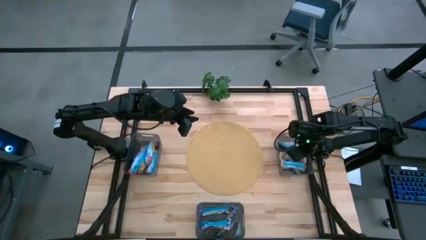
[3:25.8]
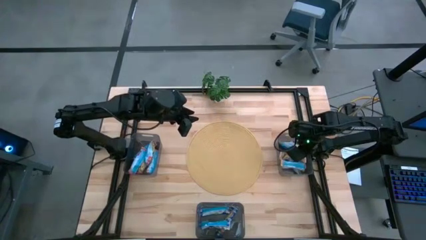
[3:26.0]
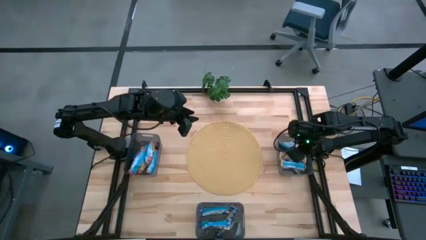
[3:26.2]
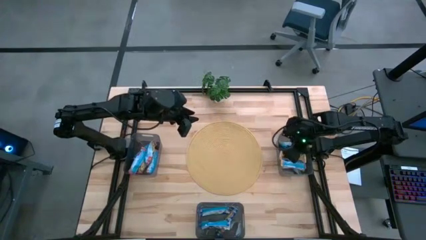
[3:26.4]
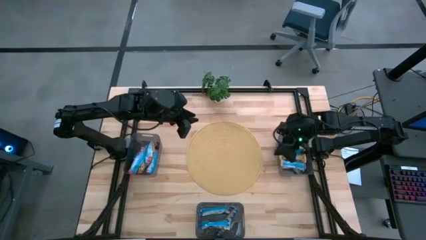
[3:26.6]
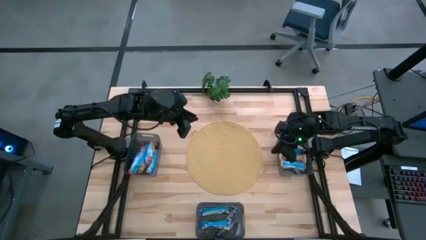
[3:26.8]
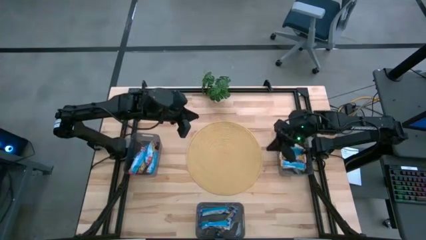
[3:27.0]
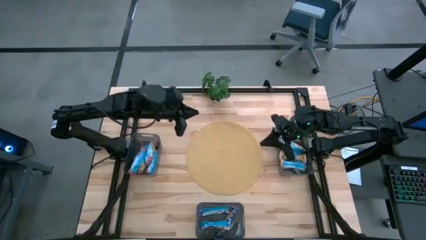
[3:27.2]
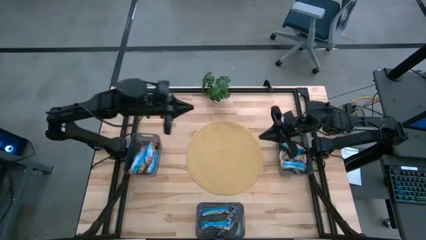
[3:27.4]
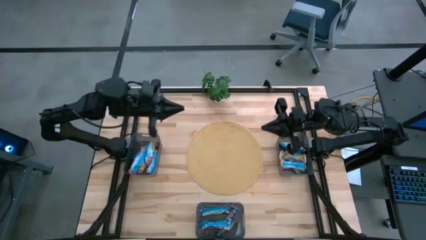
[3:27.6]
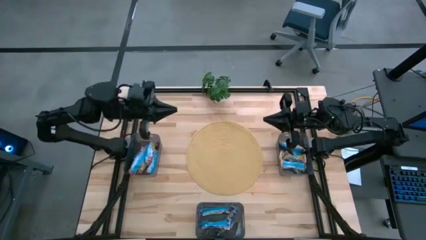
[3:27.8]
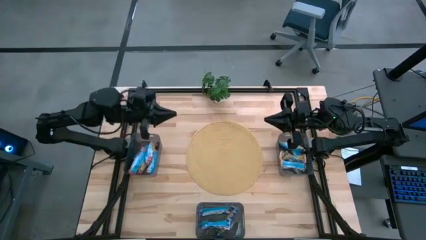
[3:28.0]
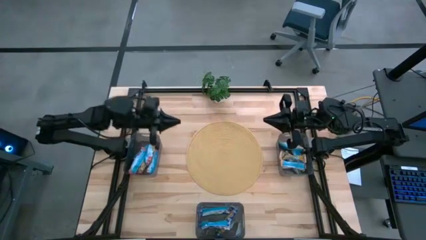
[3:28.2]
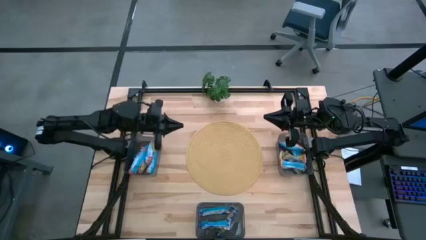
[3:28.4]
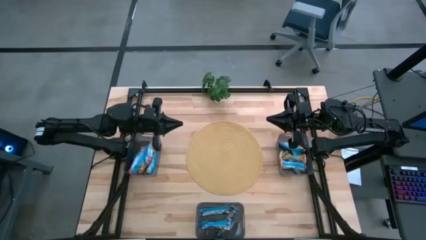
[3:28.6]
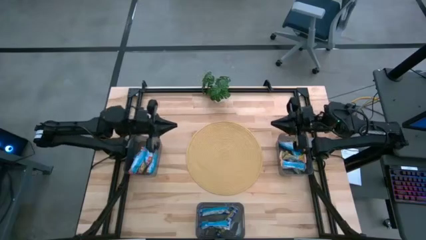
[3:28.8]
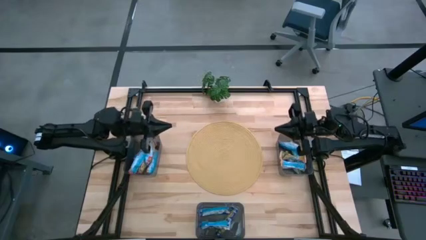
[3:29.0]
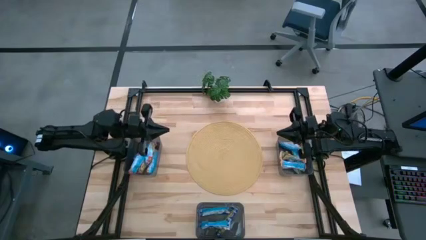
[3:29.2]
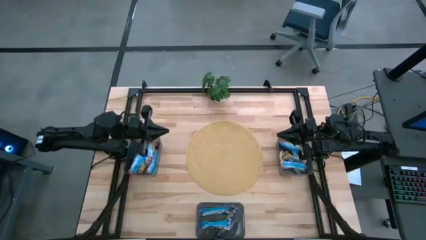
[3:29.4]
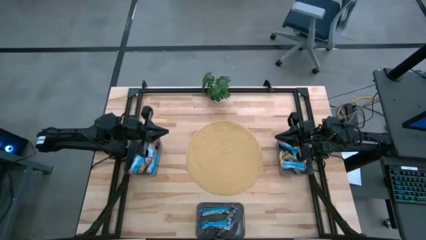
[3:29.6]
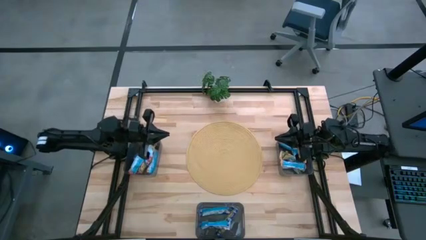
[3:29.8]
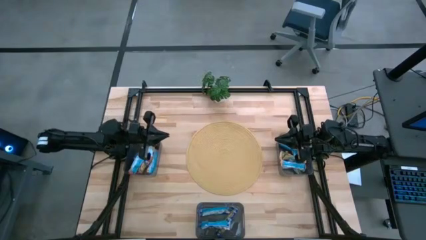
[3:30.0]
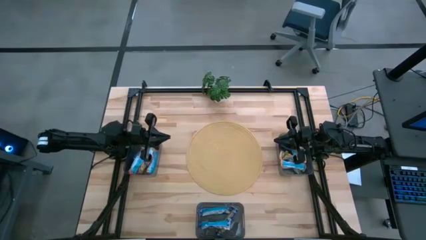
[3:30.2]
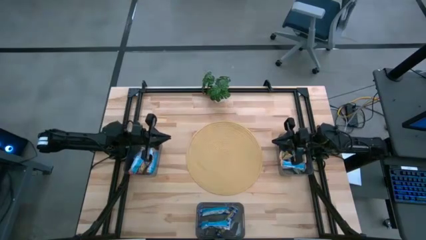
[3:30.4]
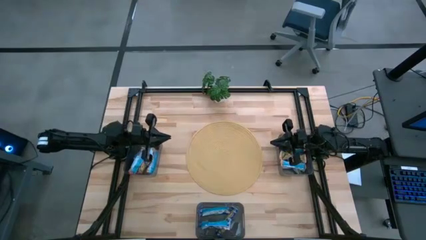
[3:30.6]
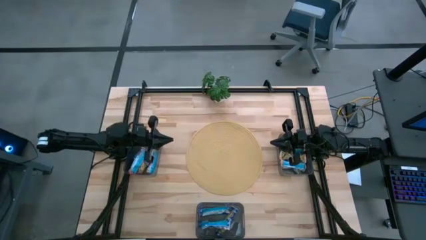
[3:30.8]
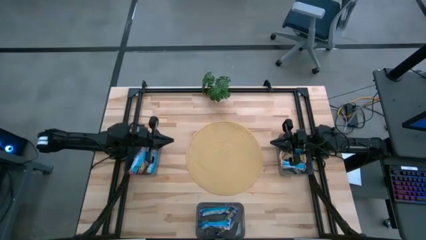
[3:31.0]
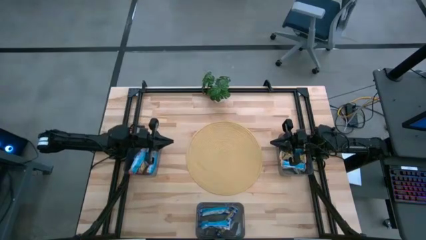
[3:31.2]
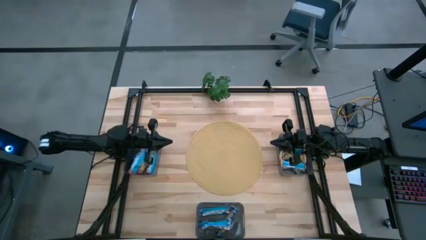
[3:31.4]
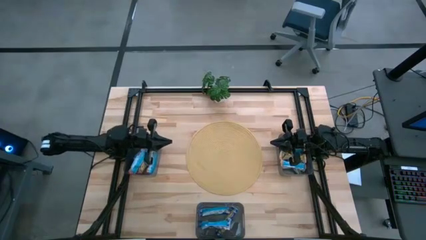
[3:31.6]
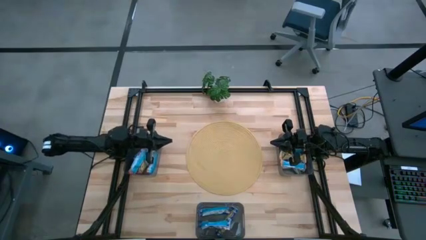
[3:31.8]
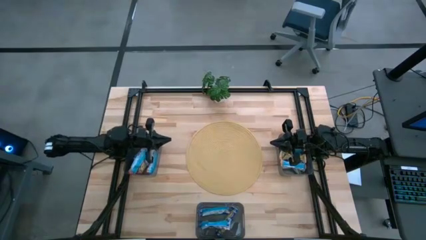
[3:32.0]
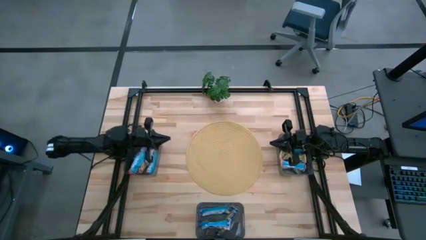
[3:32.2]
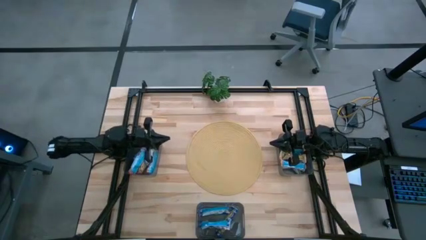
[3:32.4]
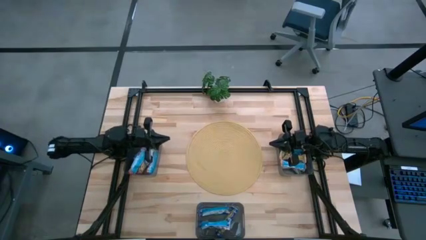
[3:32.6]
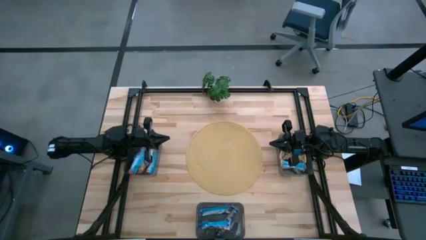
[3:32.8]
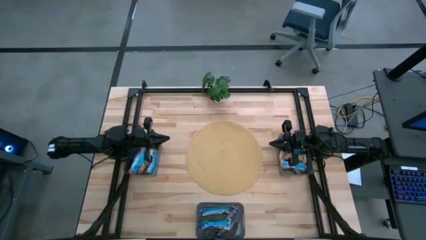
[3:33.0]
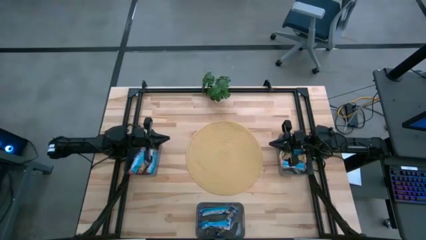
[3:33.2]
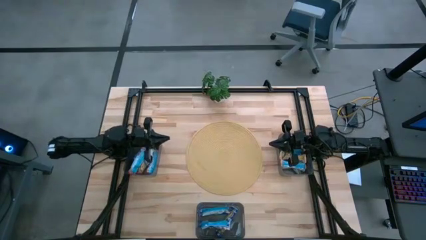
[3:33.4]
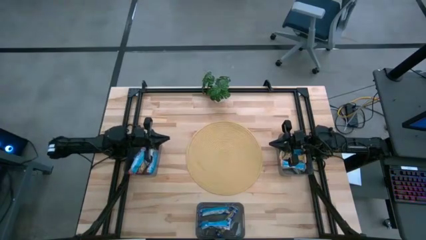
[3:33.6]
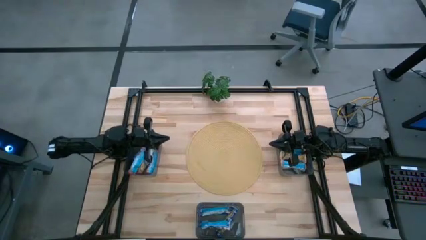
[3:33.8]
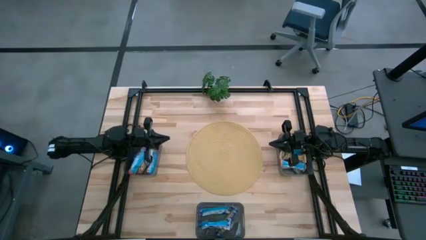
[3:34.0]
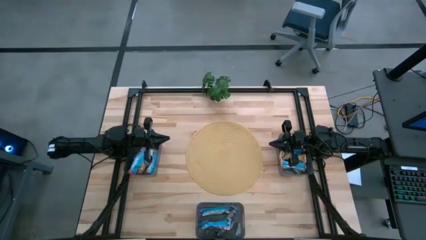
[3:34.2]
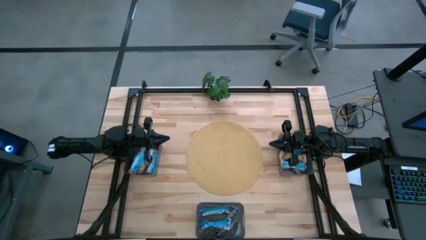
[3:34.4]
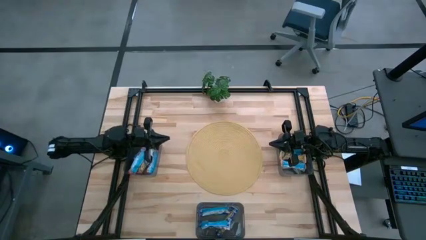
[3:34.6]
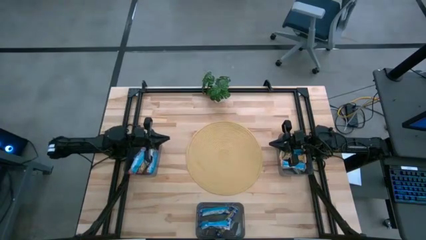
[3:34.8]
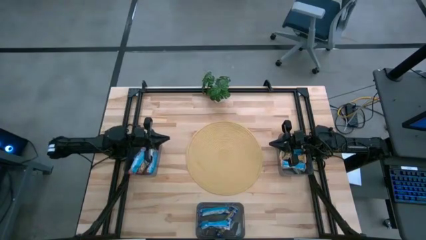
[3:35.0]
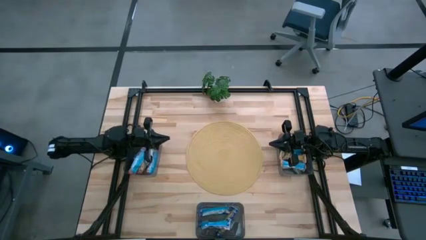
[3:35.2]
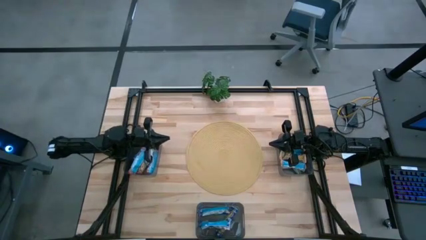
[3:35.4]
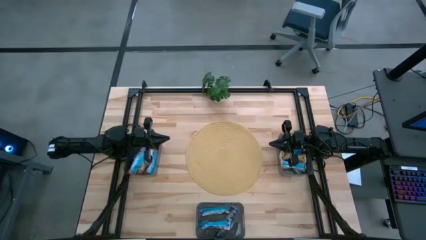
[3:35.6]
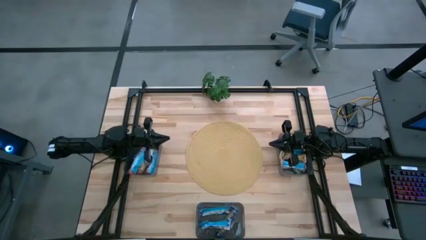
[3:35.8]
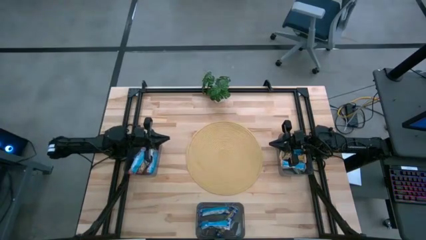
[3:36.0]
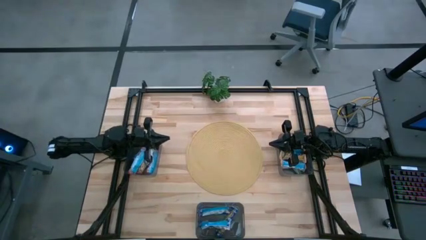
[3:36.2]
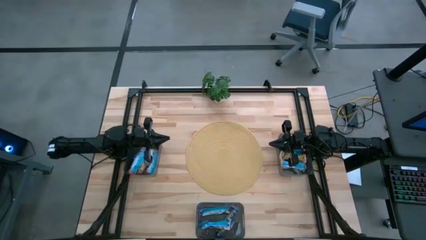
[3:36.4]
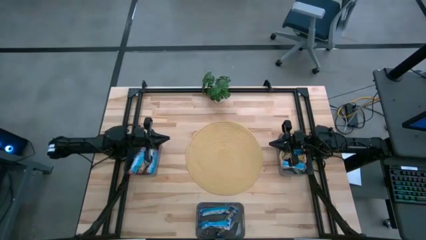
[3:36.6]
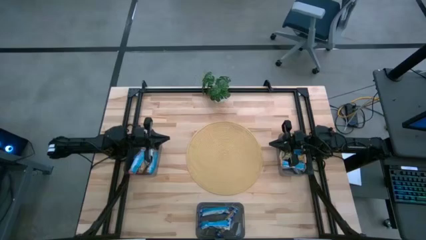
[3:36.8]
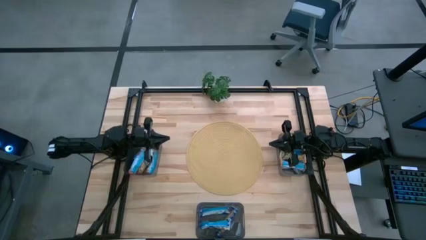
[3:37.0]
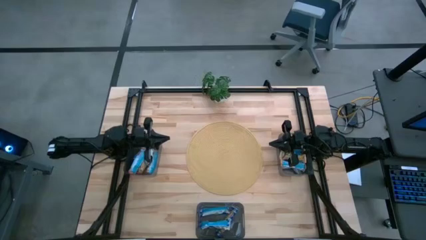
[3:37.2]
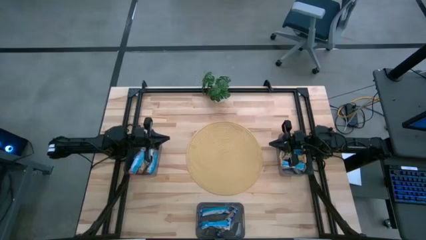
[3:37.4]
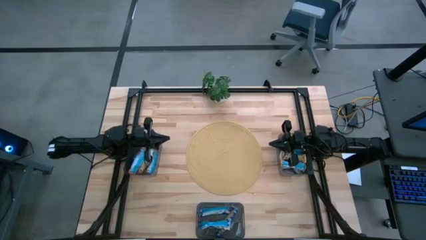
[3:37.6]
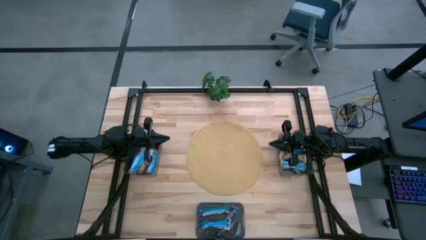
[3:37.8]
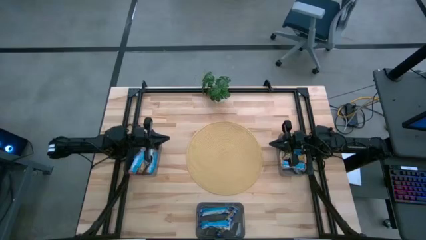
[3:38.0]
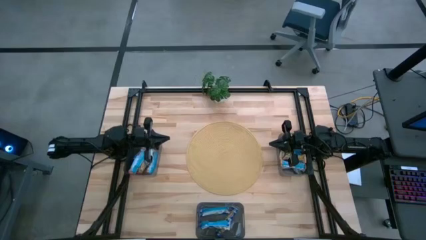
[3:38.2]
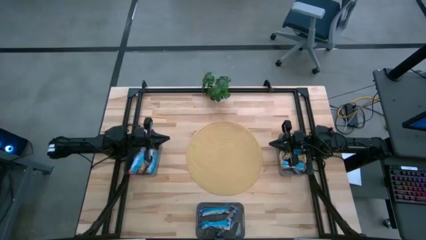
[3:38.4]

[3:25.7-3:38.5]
Task: Pick and place Granola Bars by type
Return to Home Position
